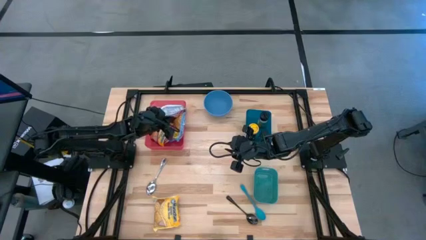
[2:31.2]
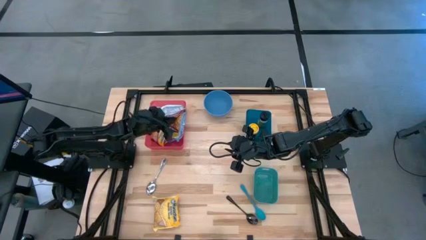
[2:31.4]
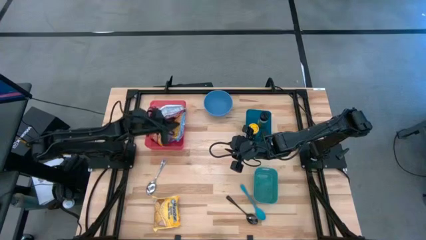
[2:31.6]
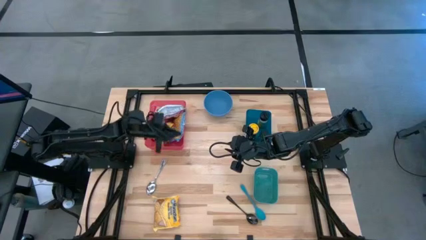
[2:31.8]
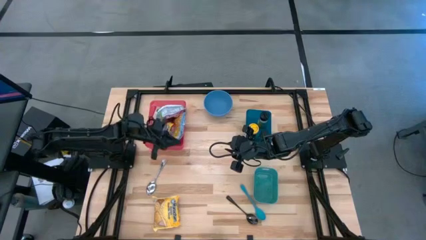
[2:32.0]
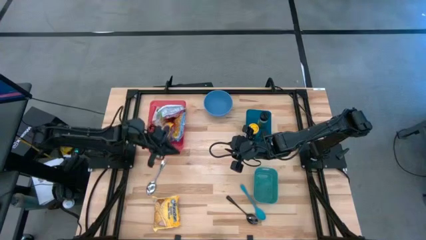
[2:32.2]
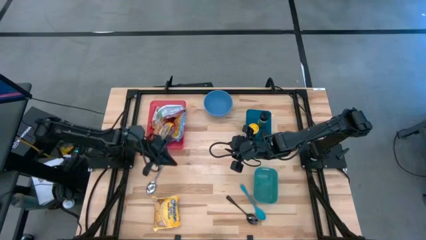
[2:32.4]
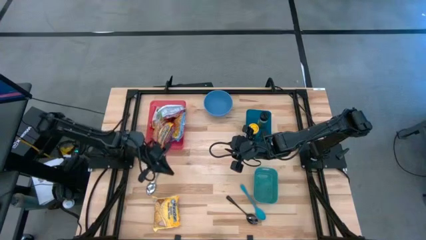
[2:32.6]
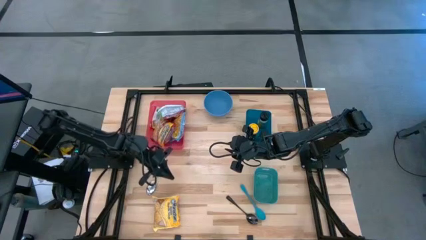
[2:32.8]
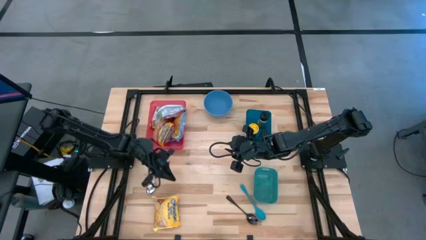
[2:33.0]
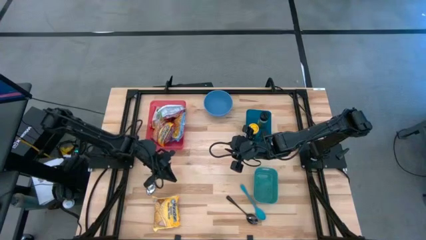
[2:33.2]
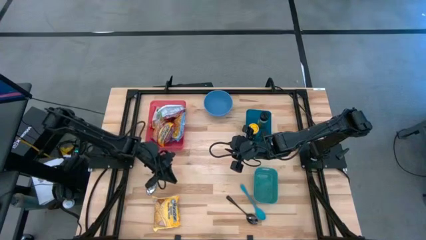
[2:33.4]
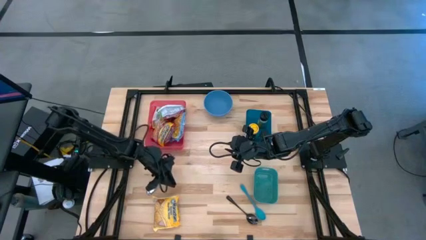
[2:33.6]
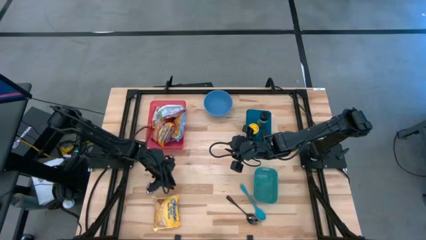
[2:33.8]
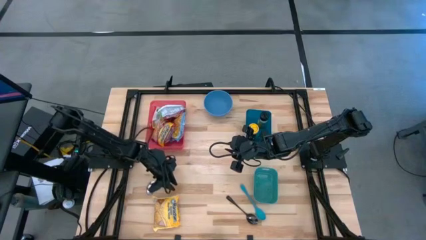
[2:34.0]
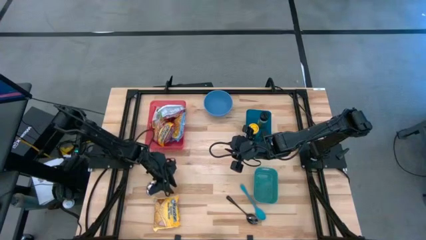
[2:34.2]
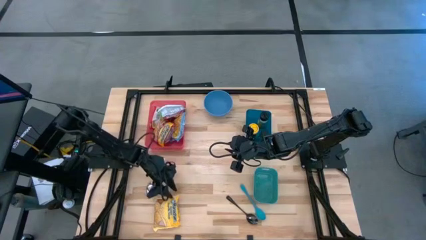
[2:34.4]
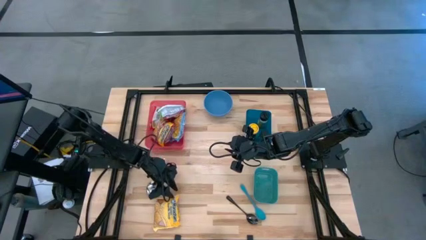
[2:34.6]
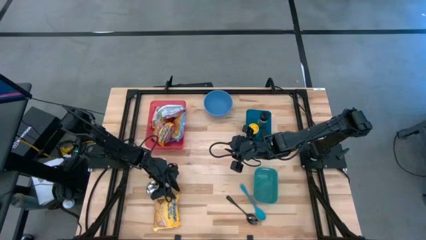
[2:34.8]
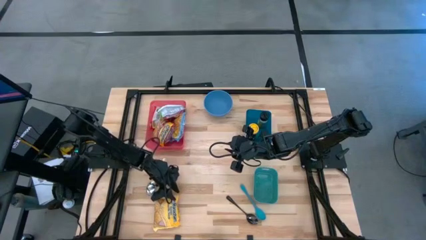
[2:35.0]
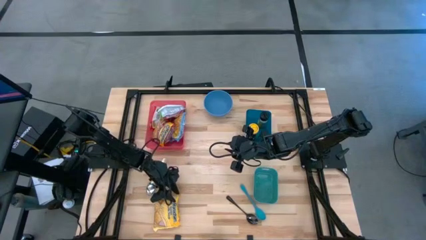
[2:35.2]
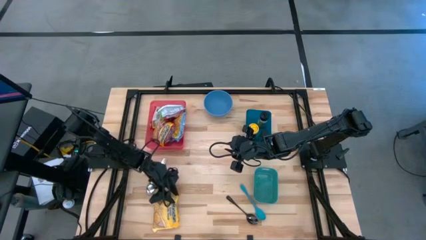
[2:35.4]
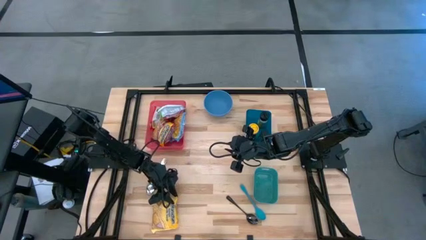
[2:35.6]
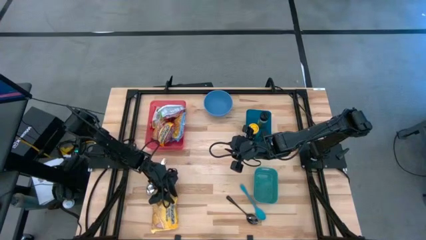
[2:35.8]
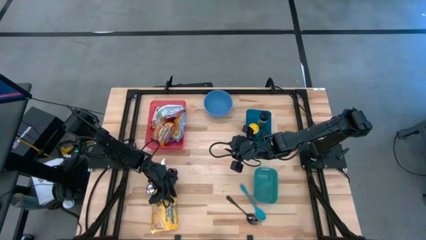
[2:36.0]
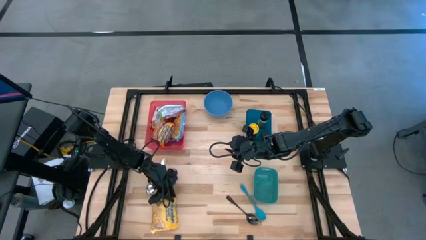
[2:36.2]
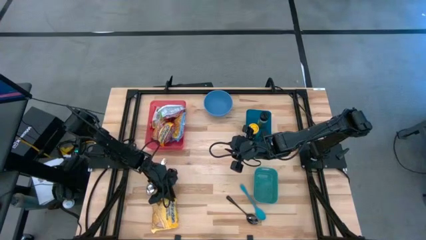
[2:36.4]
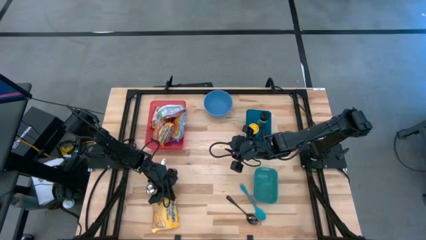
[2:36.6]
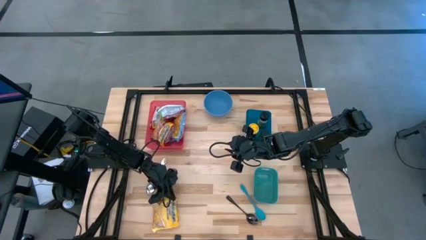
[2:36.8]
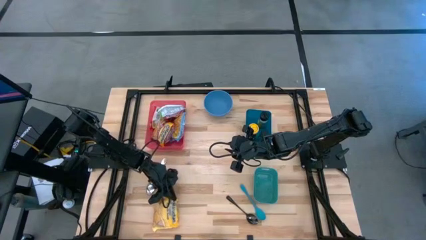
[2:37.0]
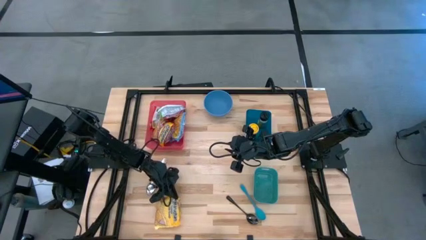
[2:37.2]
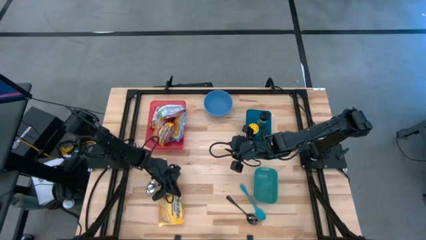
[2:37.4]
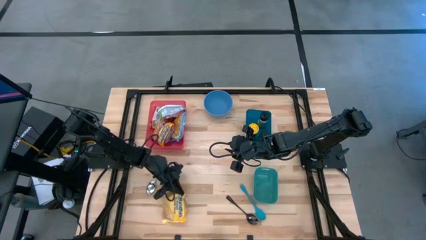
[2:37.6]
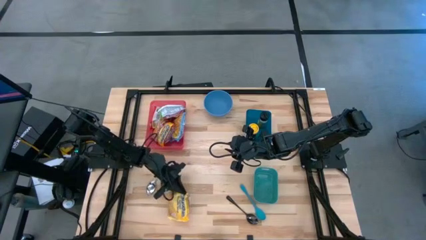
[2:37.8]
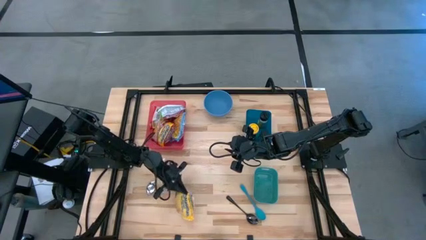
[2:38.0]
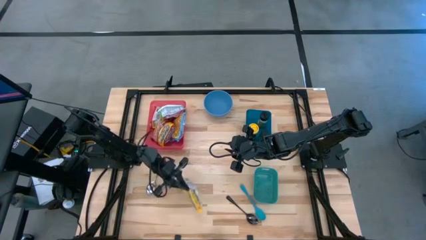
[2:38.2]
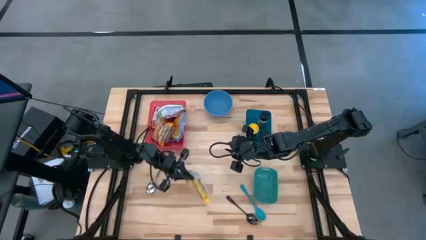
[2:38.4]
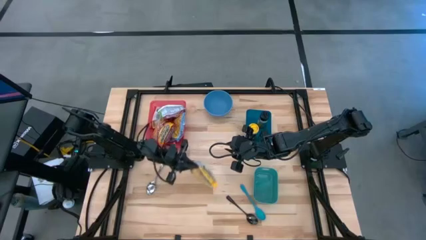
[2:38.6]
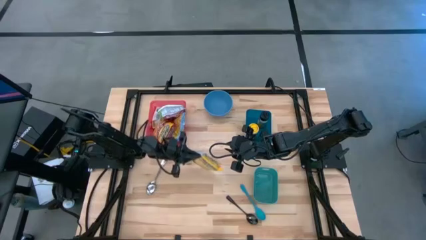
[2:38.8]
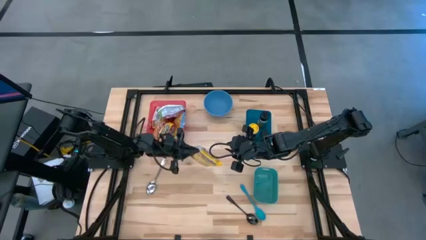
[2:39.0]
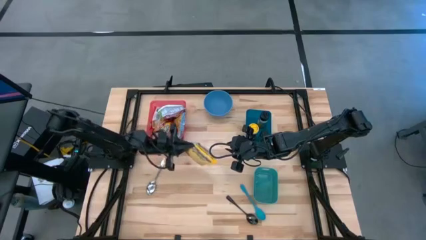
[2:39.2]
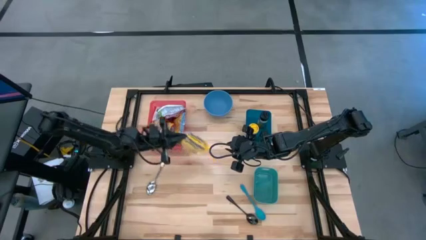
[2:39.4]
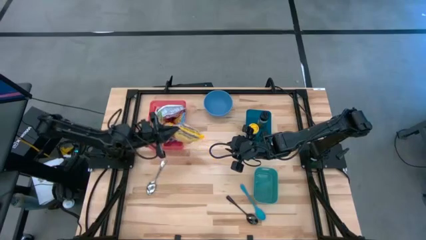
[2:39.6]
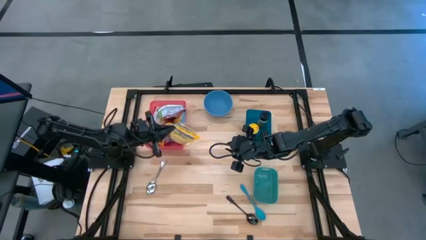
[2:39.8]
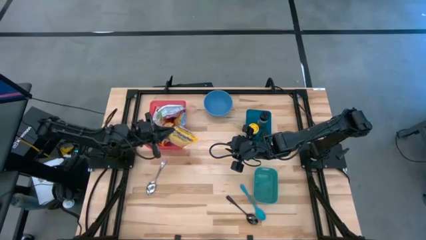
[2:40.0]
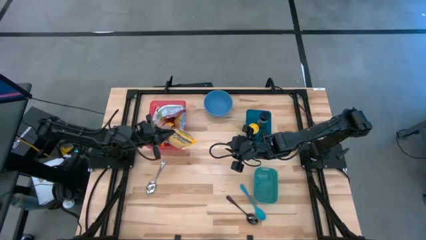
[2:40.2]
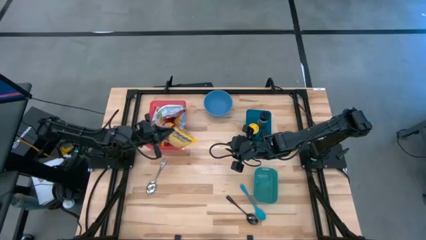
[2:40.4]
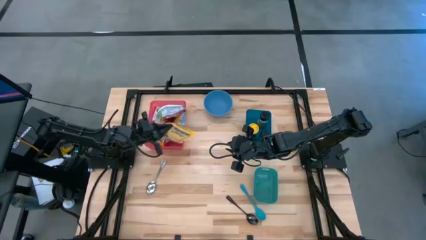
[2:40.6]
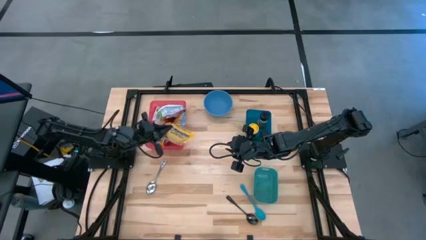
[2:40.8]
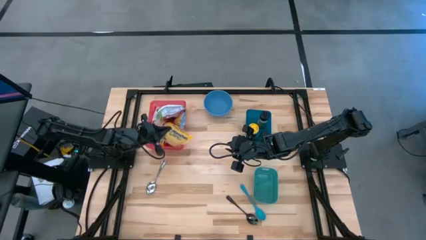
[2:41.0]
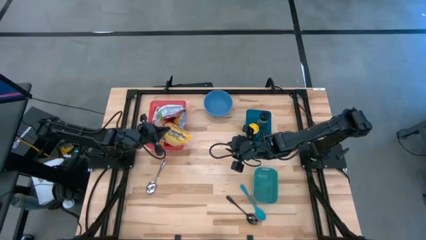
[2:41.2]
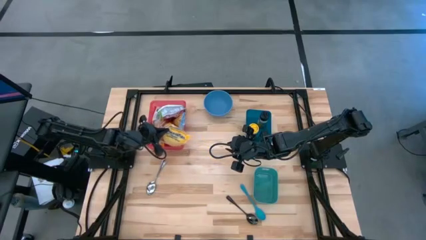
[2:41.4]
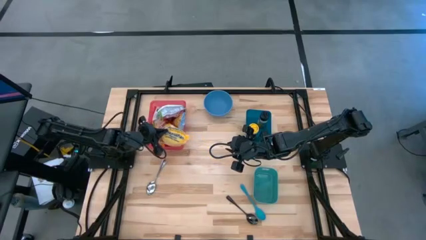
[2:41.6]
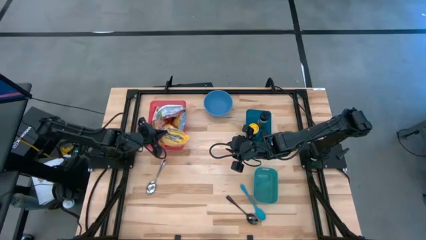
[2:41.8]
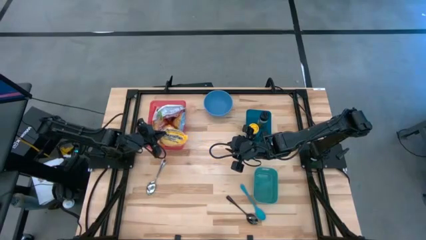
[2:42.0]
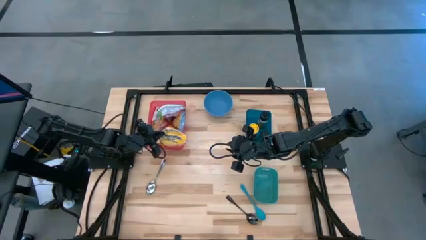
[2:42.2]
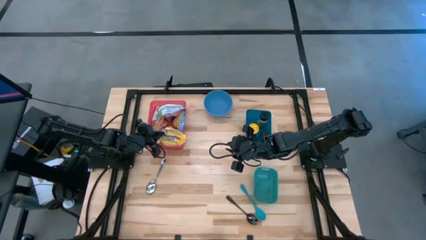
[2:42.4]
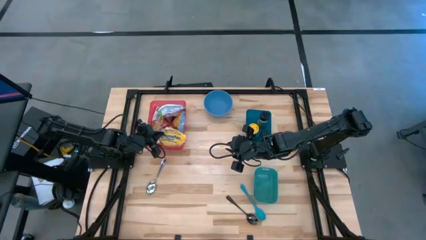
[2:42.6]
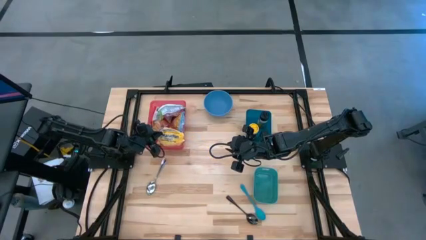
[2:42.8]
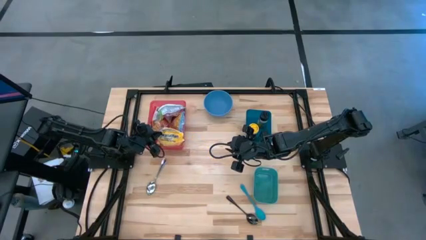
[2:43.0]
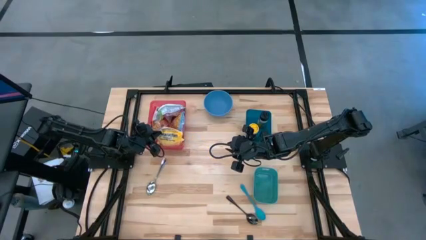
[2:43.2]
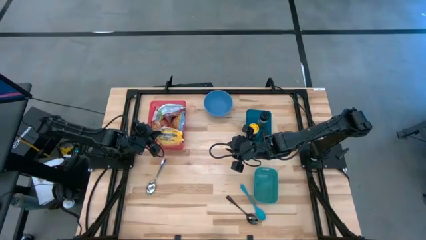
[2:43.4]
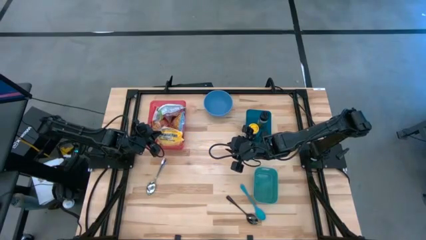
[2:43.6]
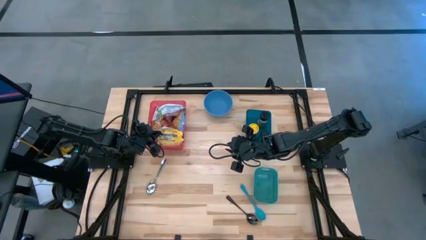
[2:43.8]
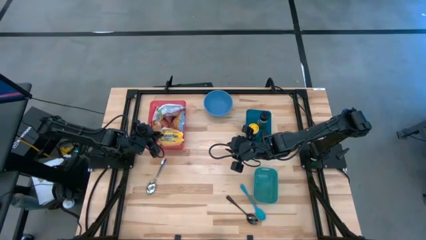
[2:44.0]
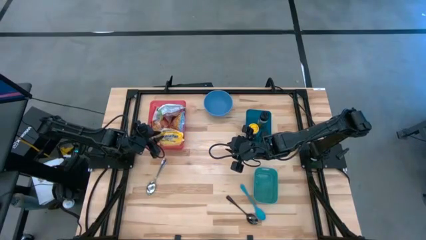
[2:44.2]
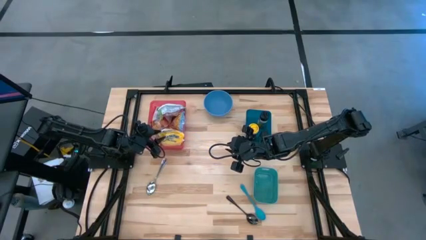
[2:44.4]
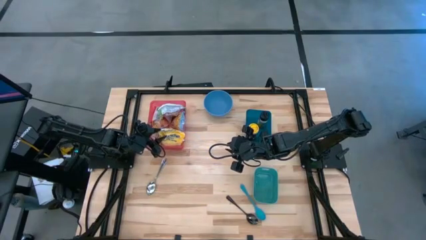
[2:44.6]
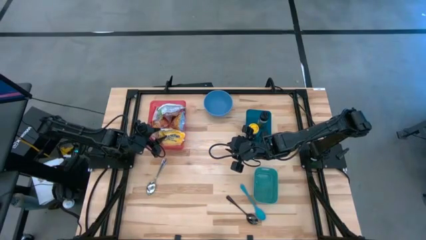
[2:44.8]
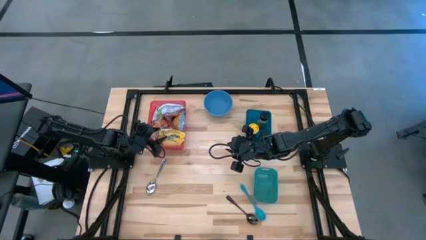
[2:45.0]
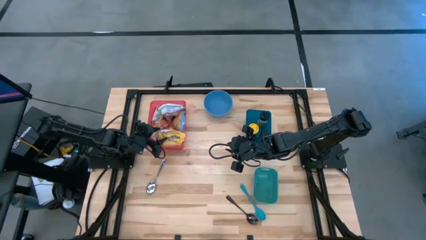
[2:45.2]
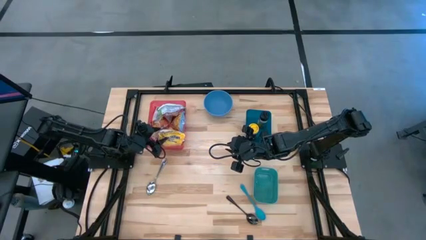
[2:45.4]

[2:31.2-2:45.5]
Task: Pick & Place Food Item
Put the yellow noodle pack into the red bin

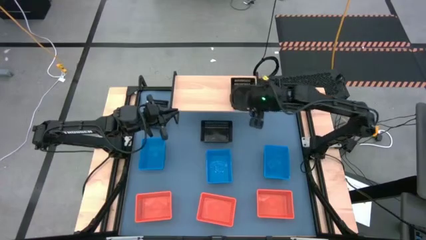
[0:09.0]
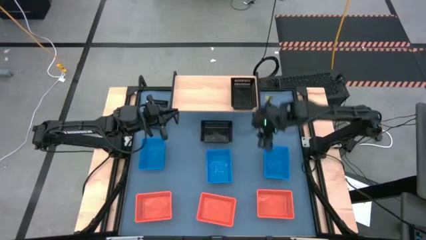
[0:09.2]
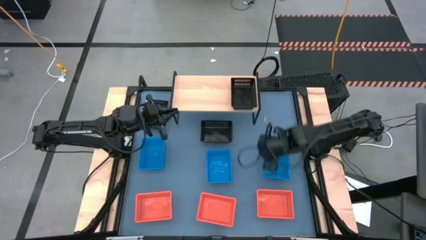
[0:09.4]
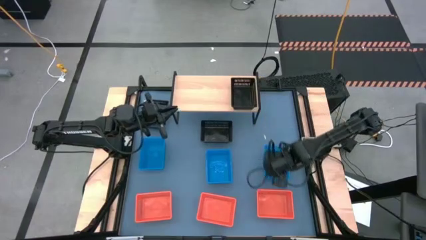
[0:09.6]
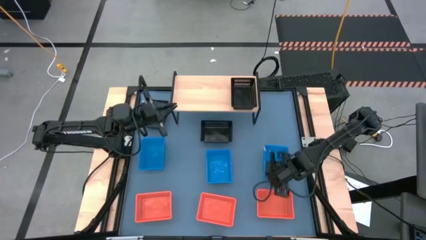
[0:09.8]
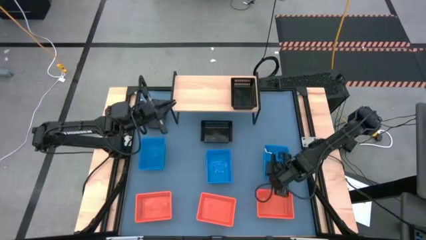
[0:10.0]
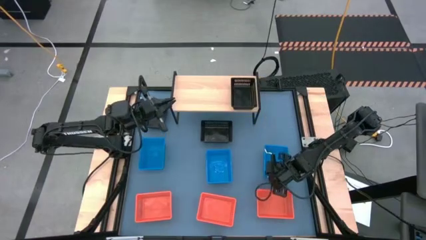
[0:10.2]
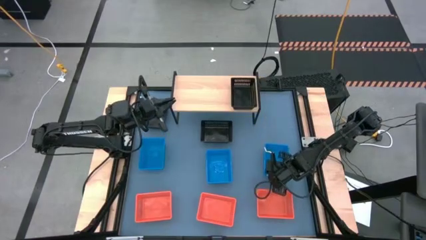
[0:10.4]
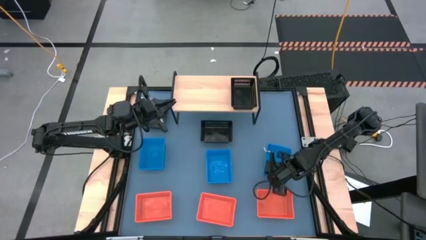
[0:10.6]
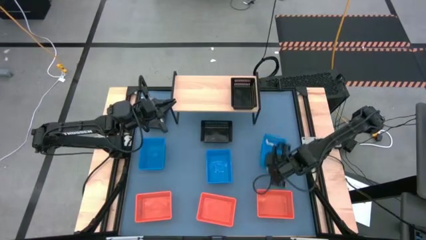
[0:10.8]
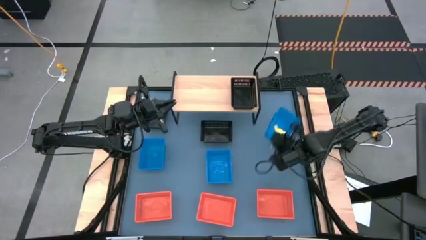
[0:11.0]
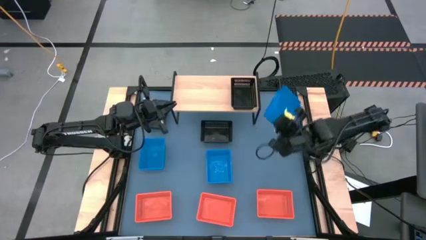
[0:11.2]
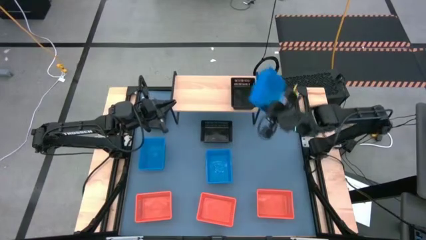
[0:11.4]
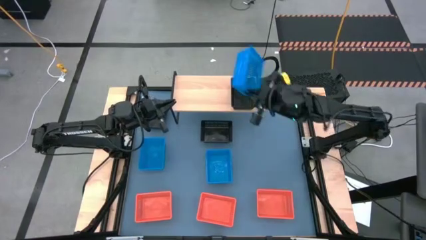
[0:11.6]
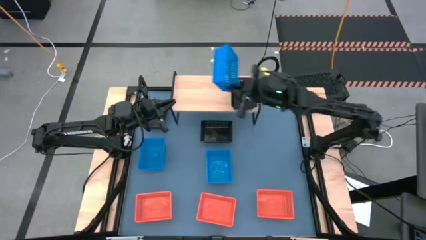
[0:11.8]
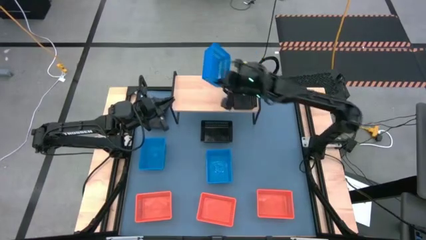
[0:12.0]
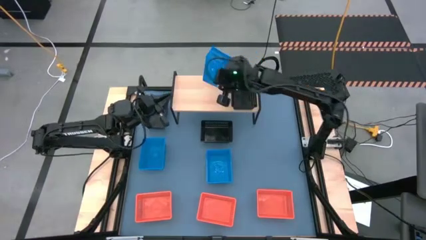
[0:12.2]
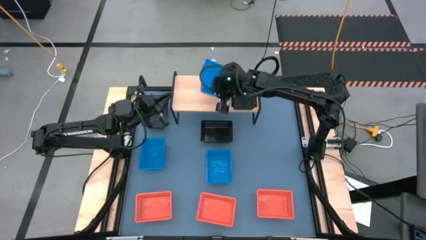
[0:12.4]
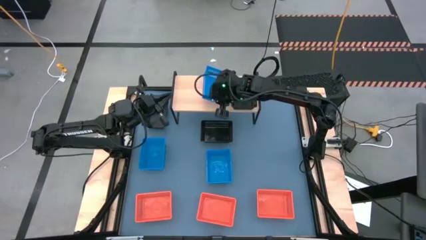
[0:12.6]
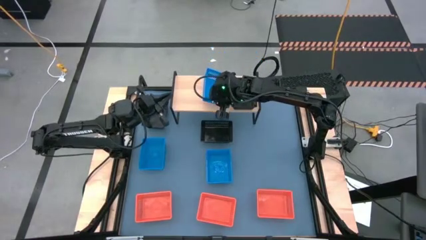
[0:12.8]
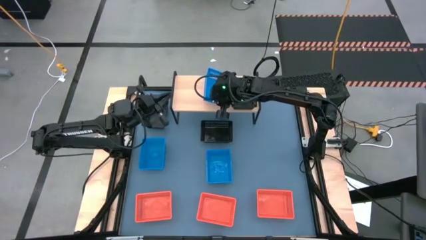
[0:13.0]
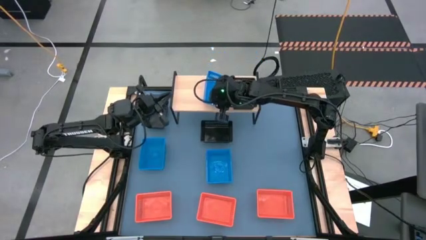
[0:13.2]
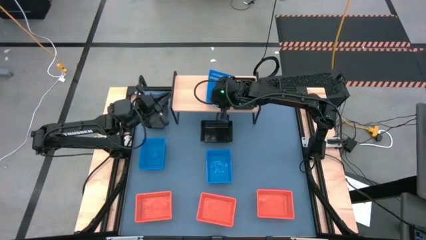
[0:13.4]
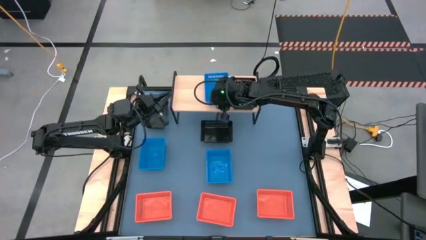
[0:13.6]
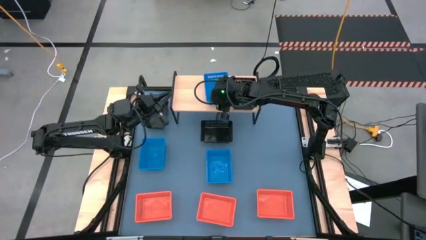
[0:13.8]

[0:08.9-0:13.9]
Task: Stack baskets on shelf by color
Put the right blue basket on the shelf
